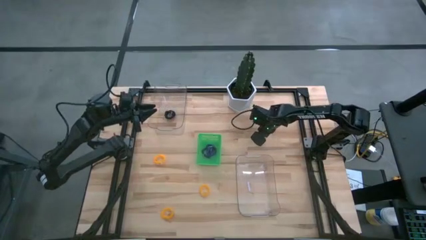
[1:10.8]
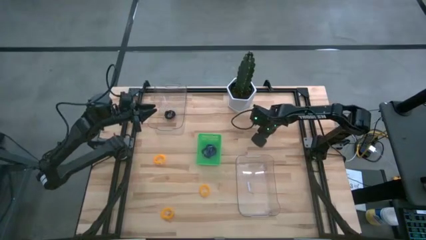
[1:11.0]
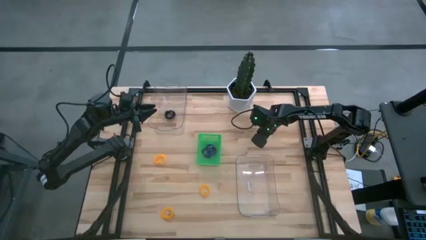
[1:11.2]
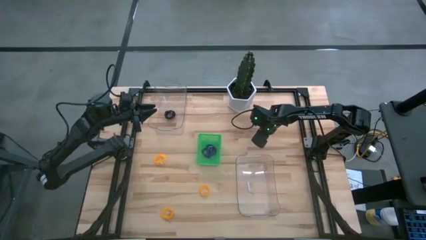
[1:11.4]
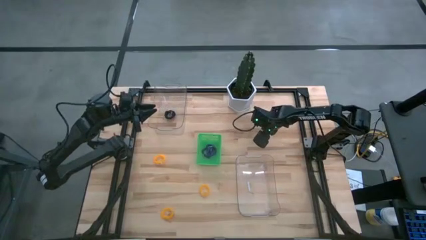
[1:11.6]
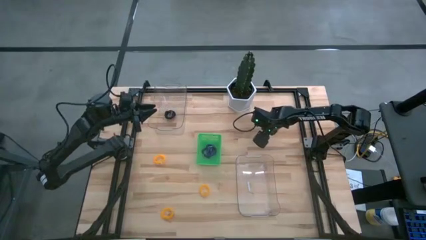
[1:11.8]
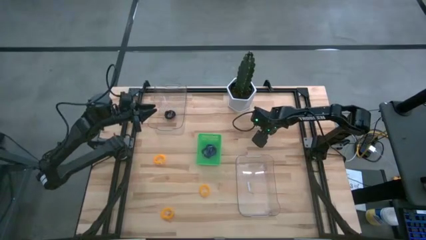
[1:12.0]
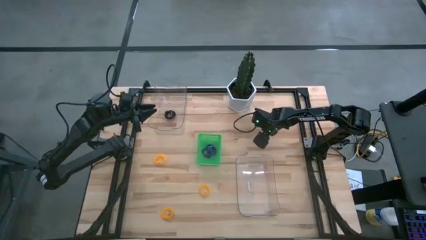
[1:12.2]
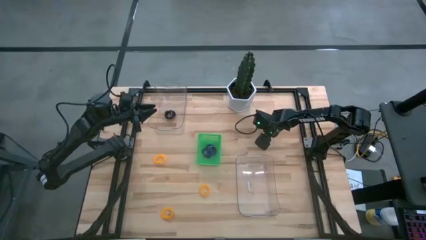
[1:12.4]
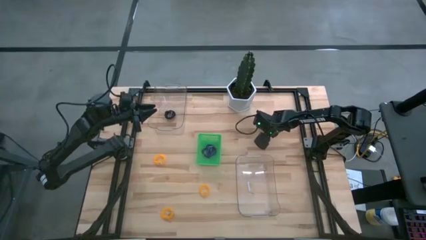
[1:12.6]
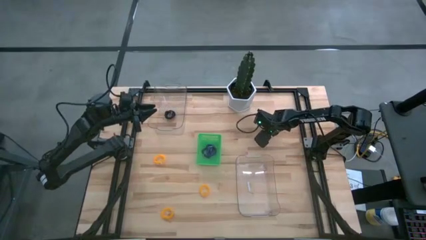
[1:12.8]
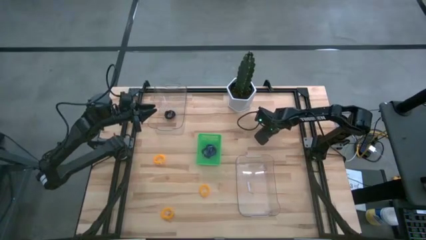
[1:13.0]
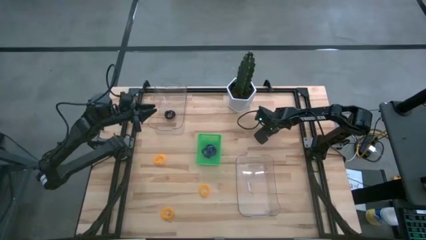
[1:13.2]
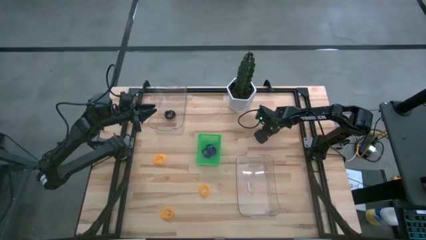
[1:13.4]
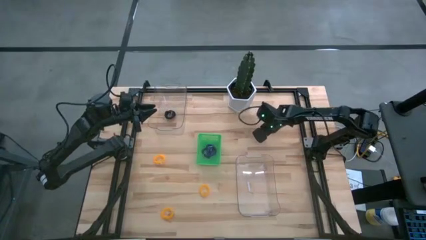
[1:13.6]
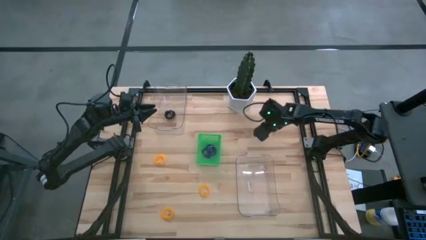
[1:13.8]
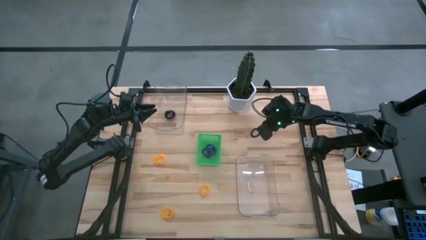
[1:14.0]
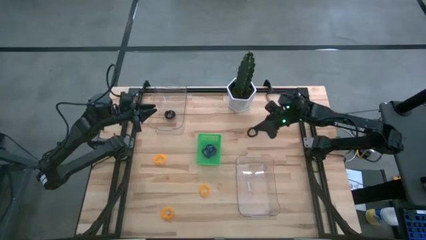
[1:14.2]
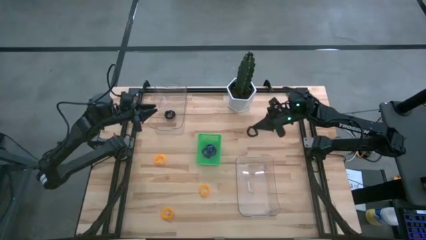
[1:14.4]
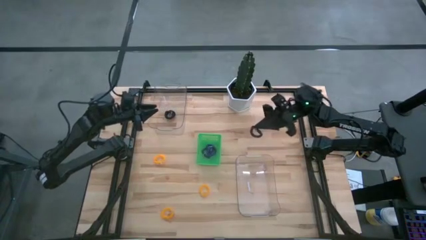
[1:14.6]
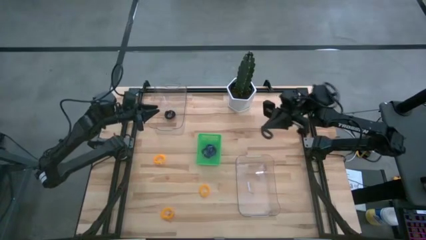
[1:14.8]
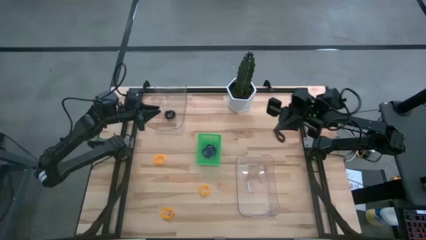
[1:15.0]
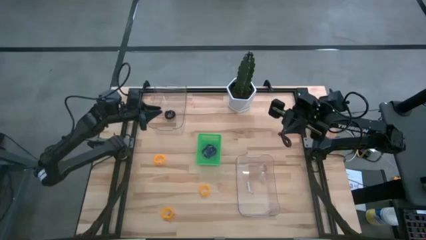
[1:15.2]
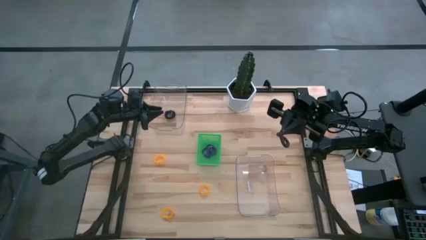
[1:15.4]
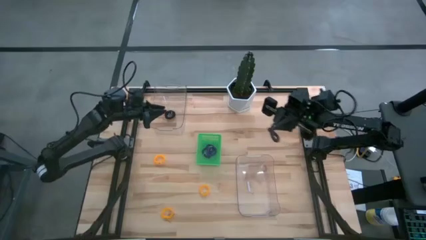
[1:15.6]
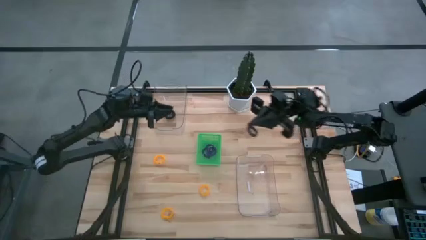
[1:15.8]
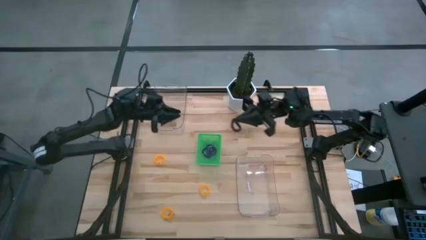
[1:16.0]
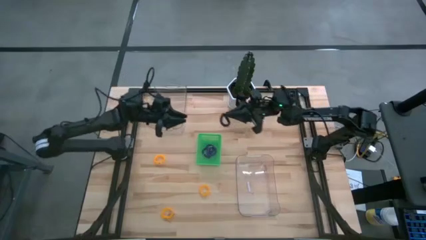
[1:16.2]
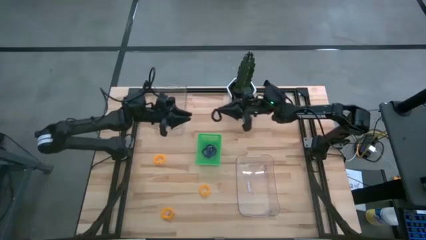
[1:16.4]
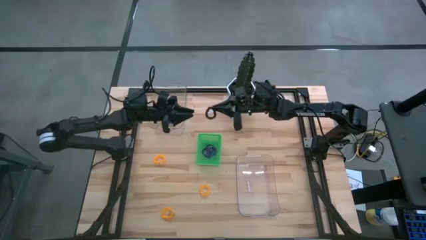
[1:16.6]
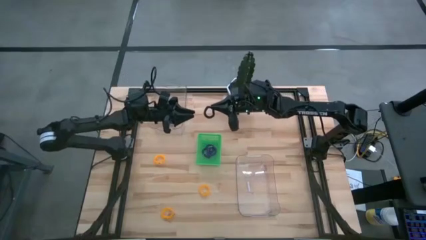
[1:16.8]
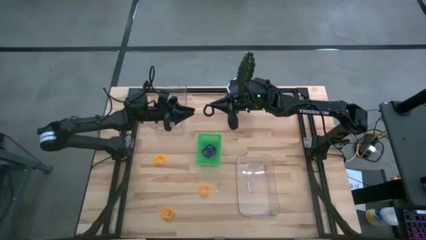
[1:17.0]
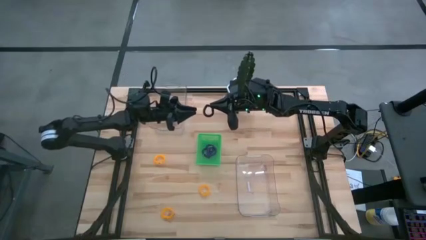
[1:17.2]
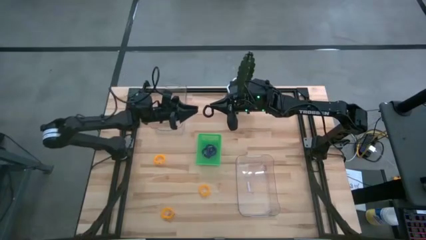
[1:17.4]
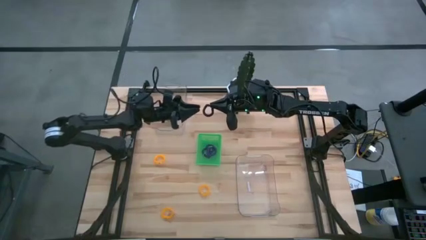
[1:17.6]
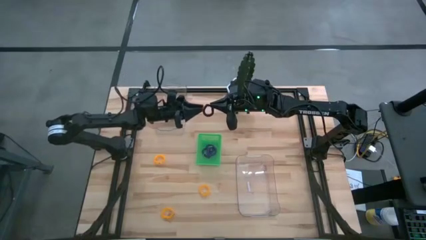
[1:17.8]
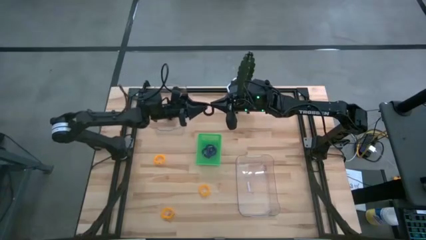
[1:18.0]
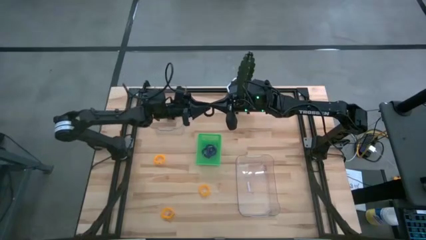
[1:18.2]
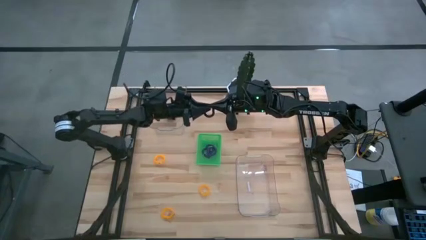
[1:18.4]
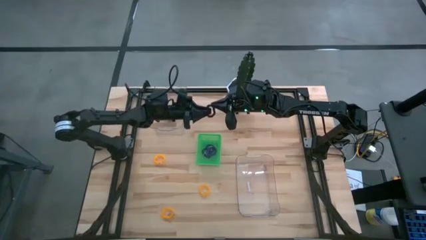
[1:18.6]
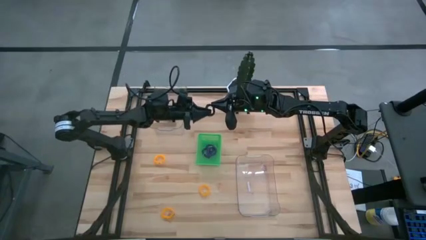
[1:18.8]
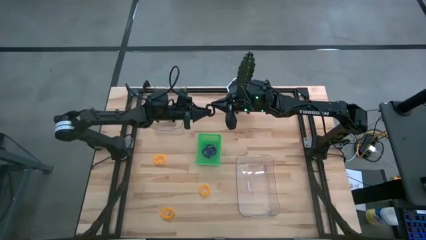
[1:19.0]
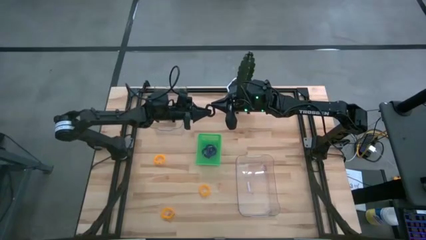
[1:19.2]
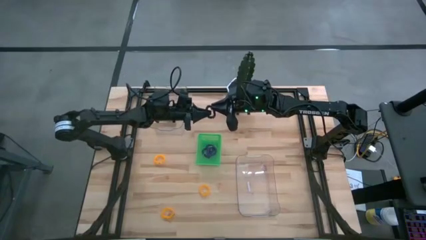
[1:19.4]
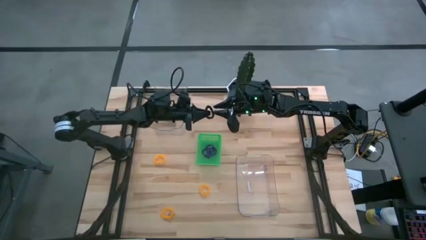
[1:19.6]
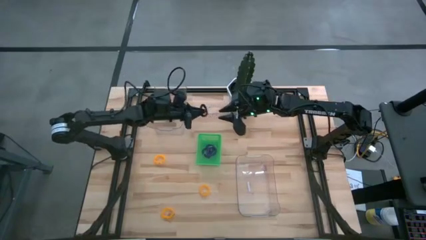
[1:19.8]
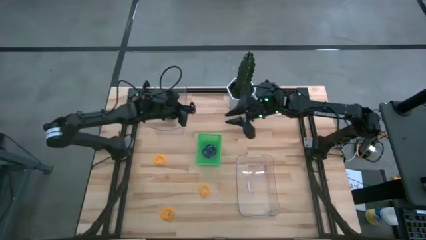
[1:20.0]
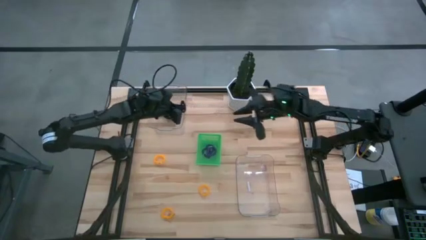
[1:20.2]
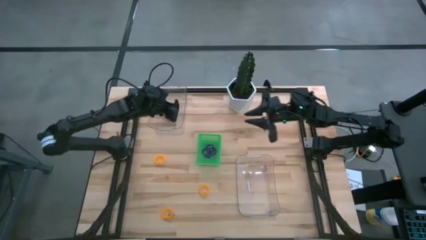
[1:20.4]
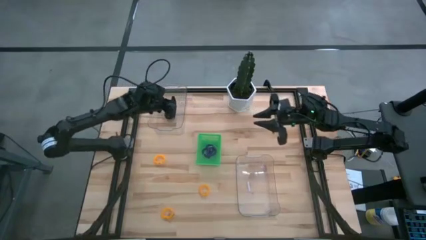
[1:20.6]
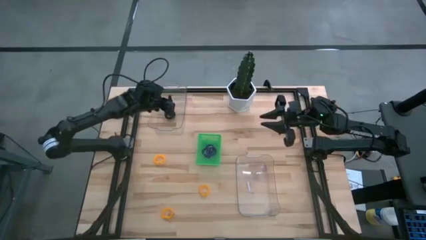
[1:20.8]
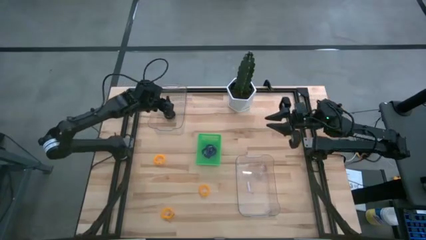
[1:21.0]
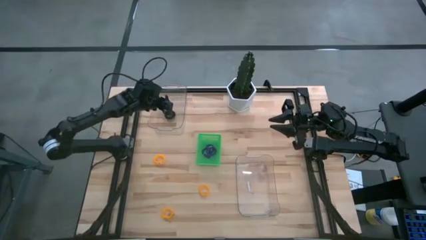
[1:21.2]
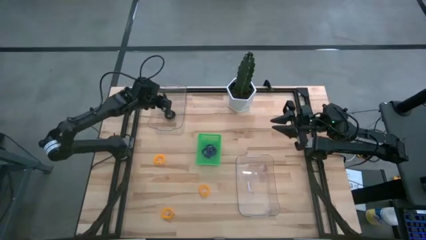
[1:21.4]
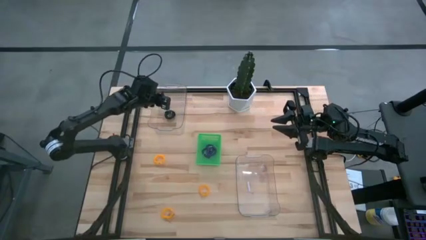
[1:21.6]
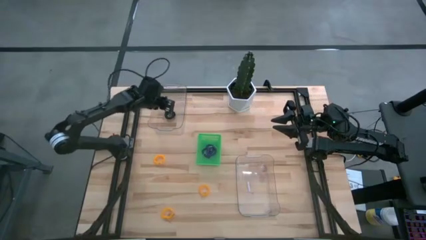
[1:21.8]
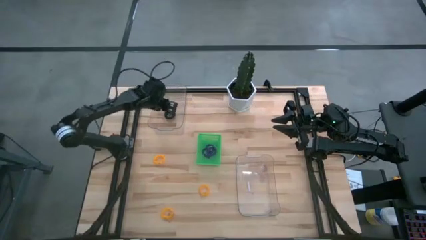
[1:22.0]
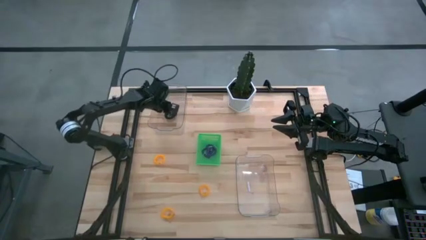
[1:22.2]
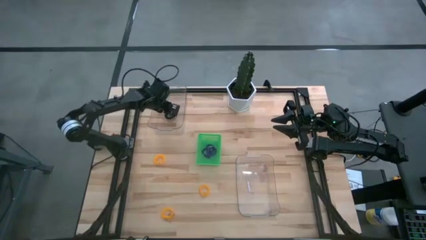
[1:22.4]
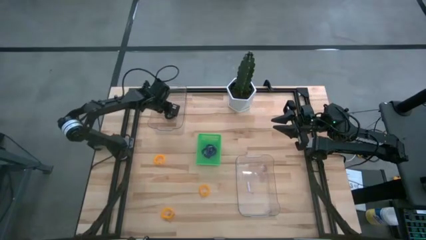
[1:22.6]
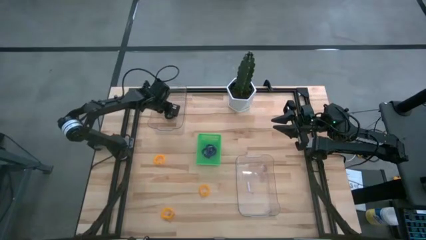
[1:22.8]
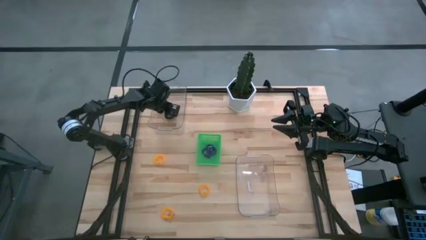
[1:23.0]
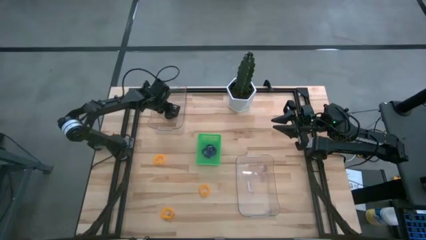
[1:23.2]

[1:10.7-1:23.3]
Task: Sort spring keychains
Put the black spring keychain into the top transparent bin

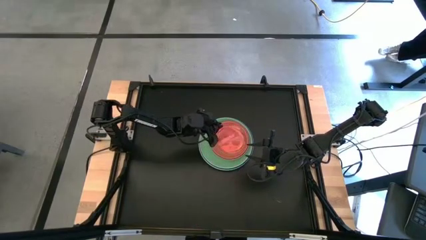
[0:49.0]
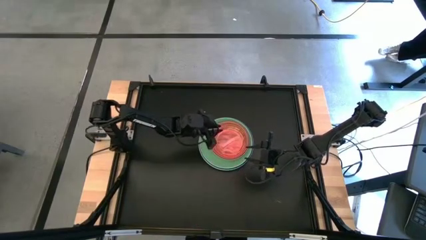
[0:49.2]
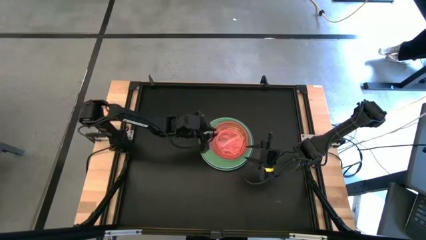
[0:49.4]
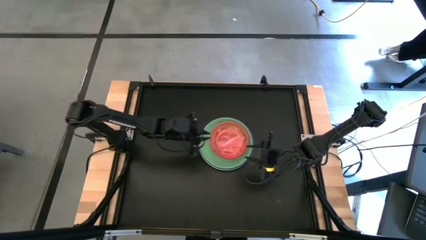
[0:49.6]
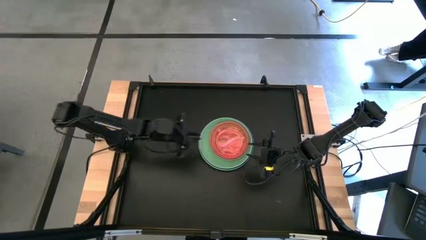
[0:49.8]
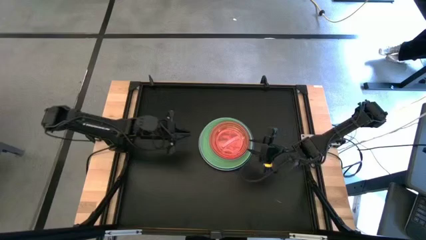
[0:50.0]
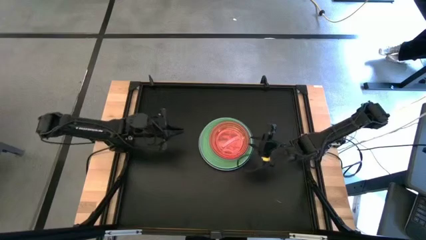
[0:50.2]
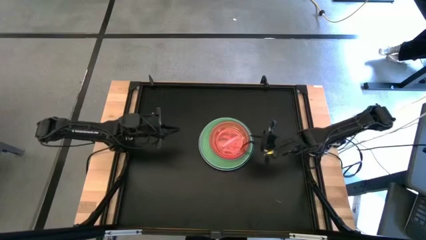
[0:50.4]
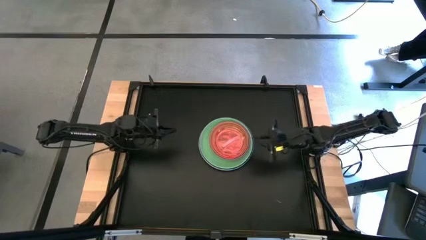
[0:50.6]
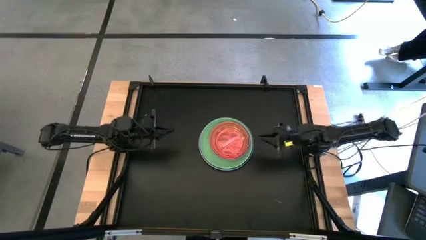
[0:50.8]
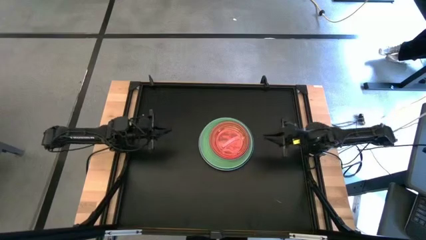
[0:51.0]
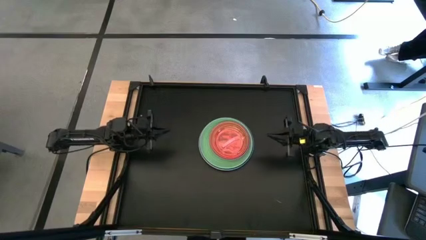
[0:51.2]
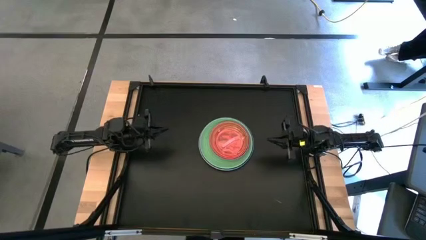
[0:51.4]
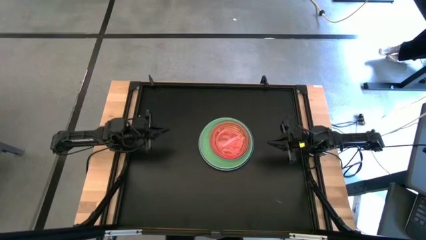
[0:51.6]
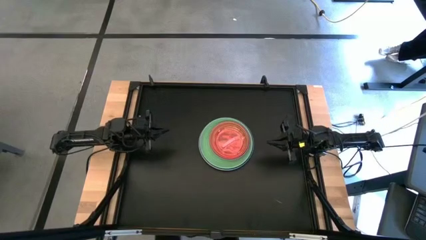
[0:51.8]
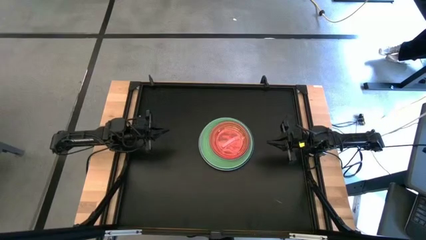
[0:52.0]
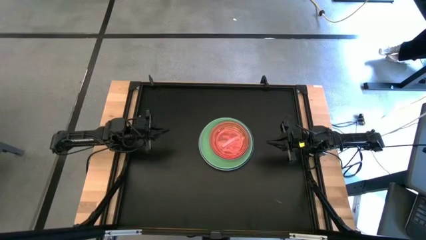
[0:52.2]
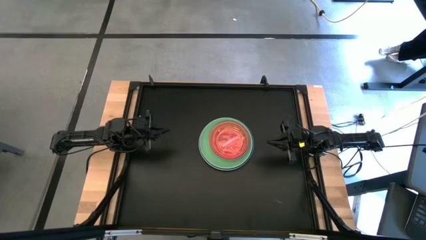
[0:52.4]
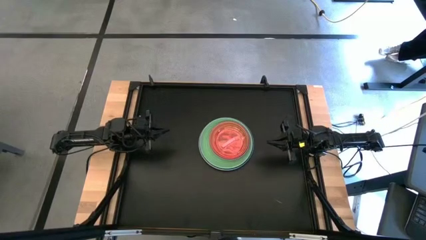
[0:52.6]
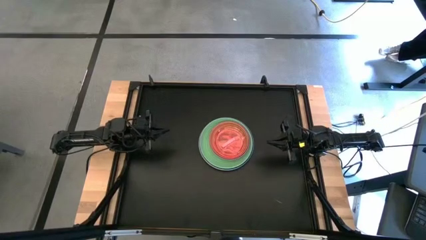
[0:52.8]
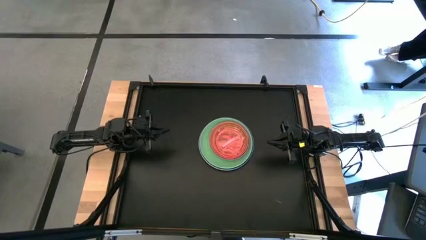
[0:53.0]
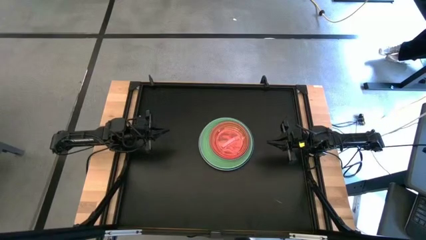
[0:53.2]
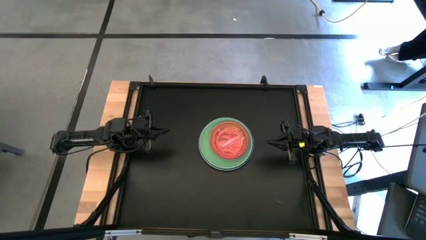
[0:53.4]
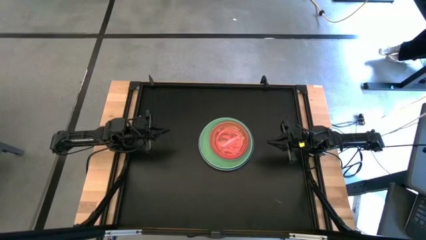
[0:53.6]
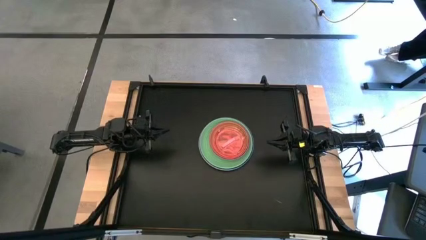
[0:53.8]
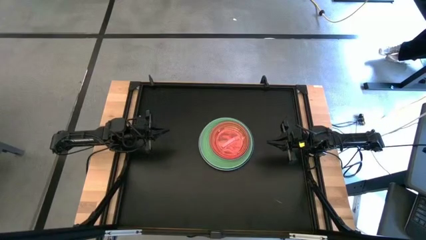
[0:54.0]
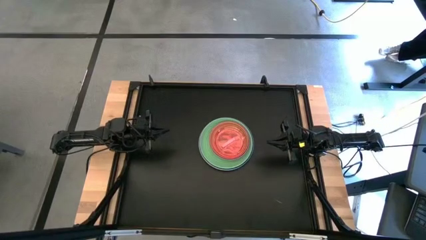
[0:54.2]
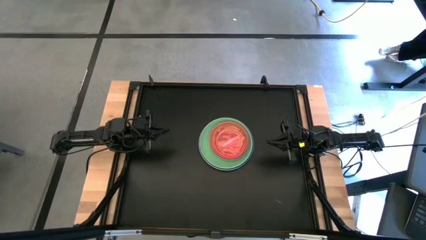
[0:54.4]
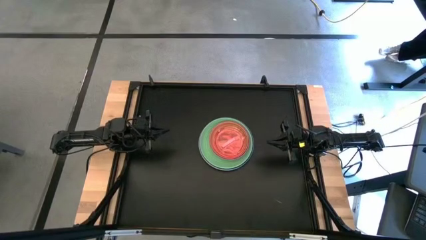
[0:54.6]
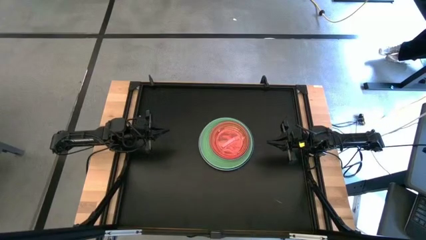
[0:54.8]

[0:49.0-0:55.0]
Task: Stack plastic plates
Return to Home Position
